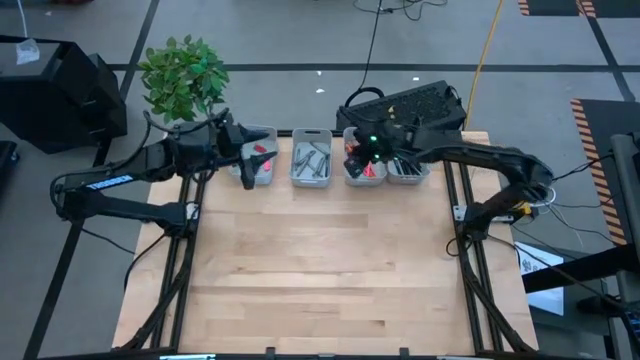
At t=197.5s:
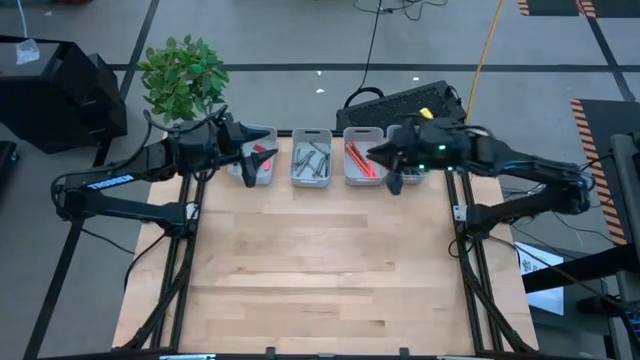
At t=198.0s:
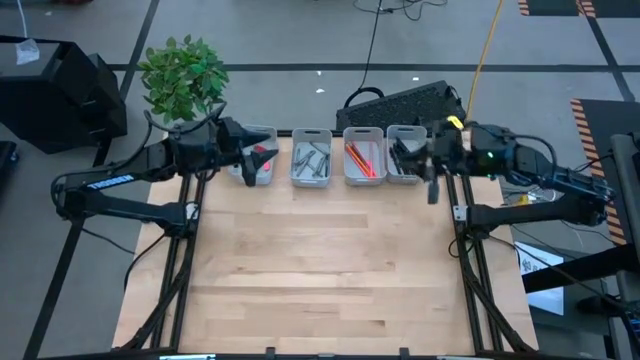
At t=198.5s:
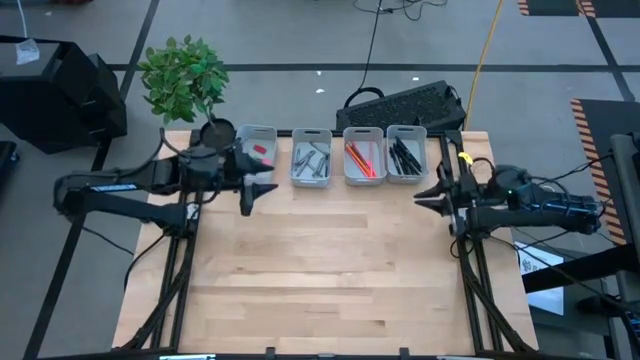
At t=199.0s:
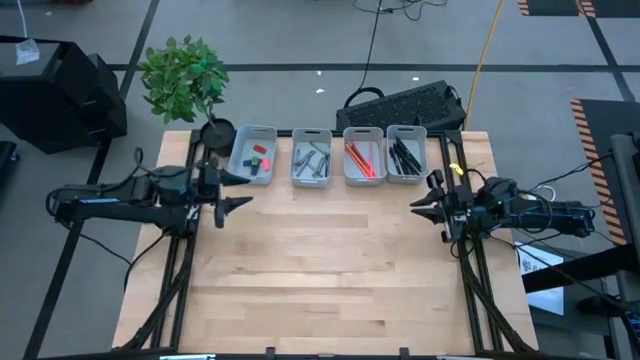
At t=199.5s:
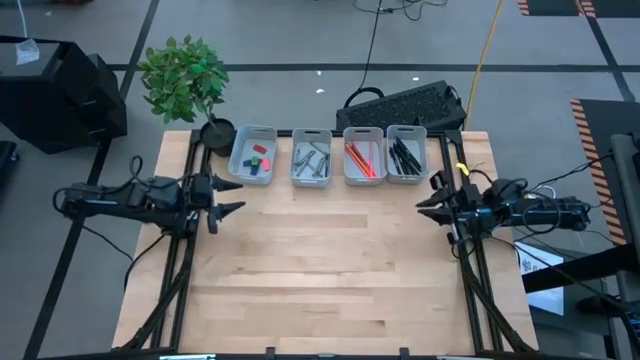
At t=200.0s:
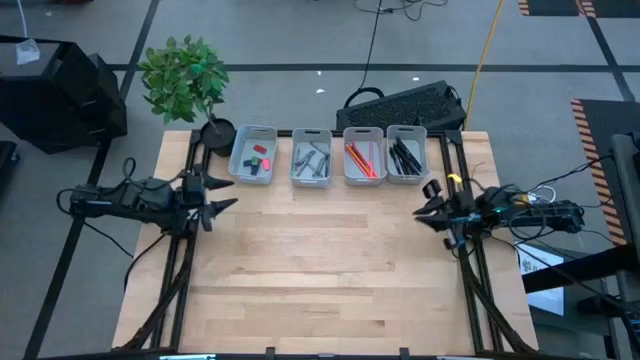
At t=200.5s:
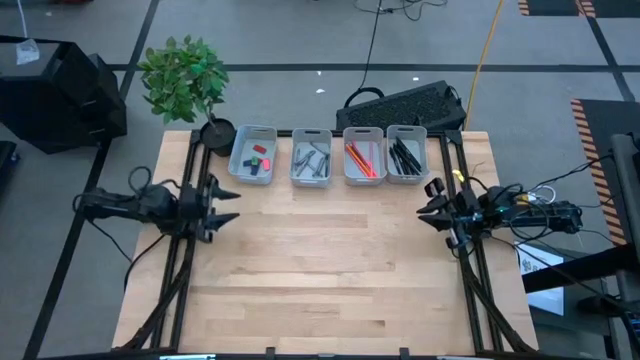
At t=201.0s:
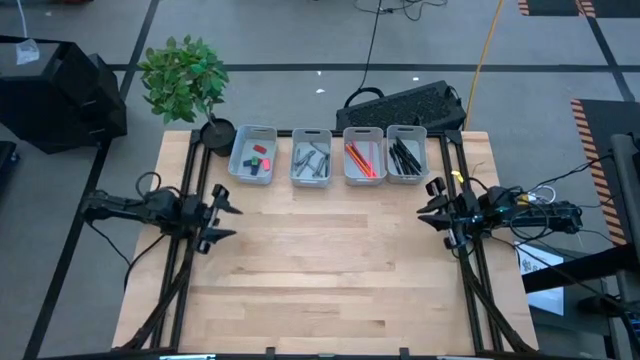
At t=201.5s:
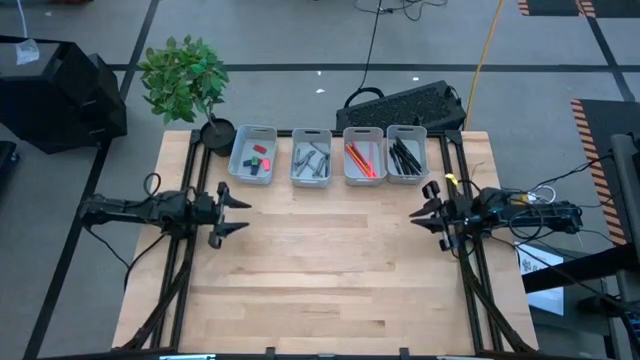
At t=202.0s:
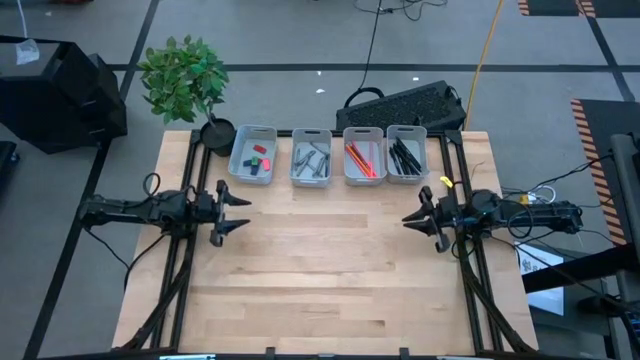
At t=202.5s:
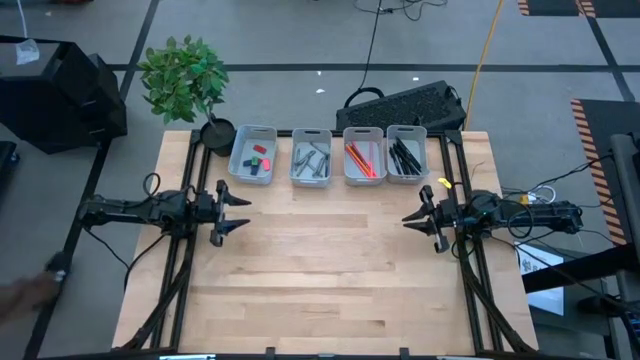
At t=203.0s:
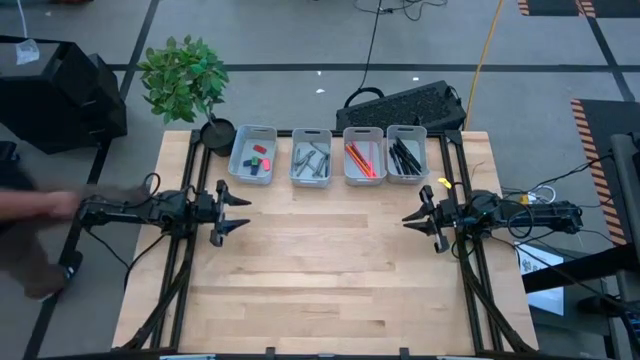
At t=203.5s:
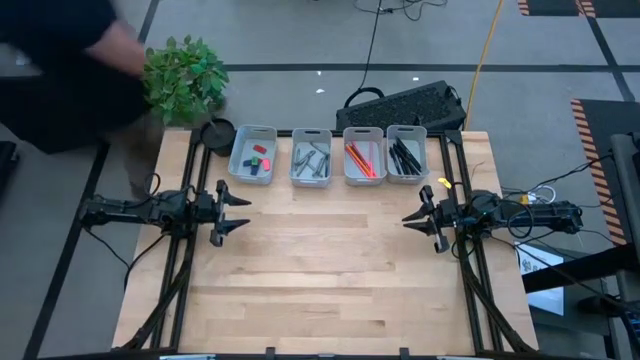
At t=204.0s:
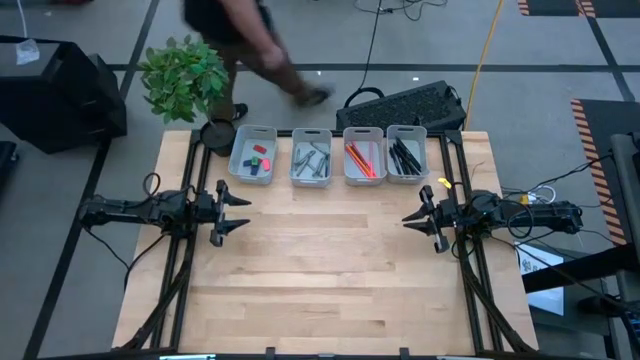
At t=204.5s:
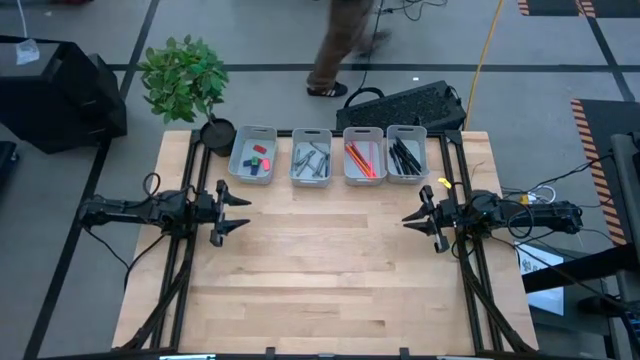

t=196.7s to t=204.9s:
Task: Sort crayons/erasers/pens/pencils in bins
Return to Home Position

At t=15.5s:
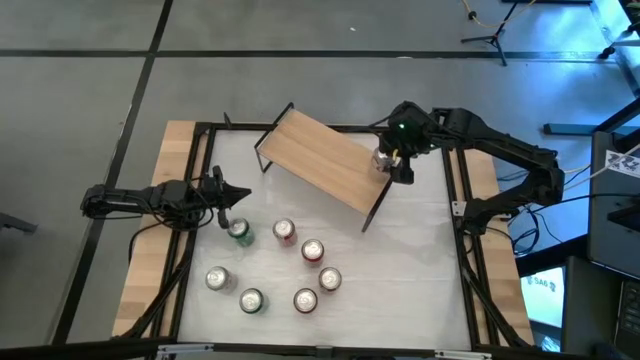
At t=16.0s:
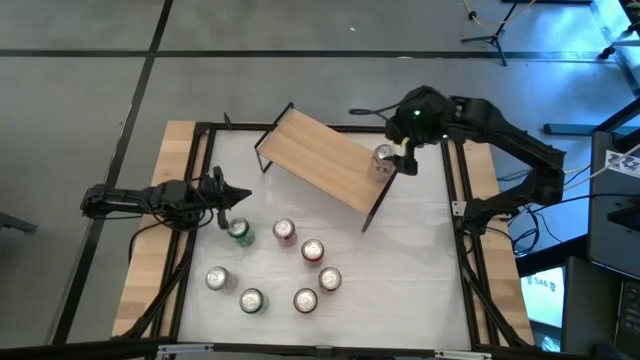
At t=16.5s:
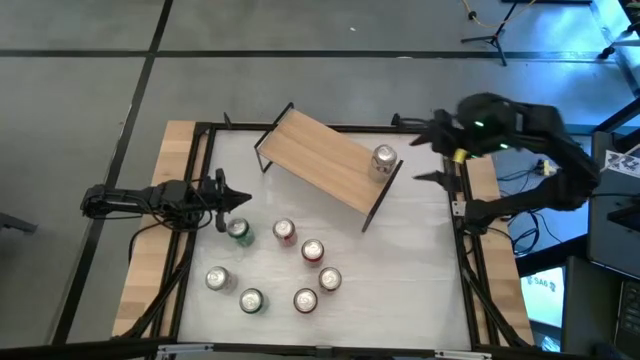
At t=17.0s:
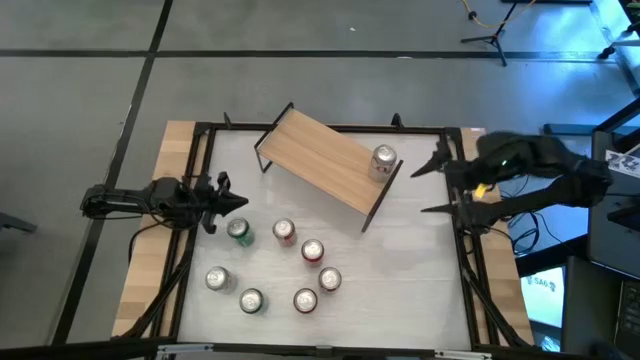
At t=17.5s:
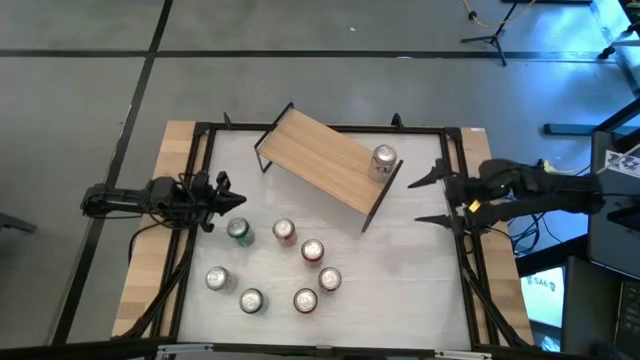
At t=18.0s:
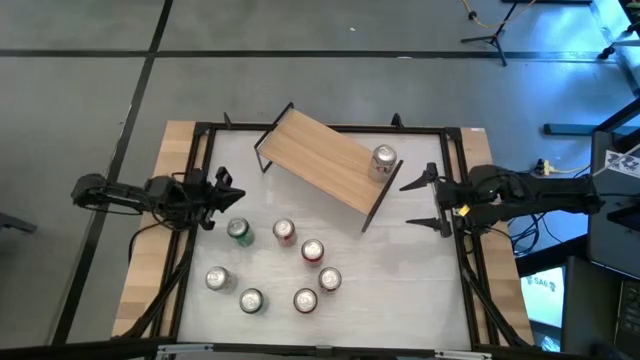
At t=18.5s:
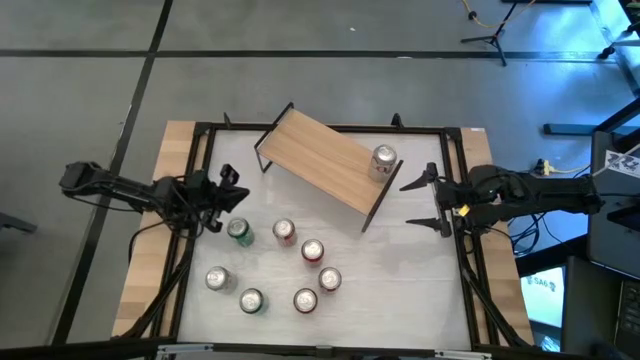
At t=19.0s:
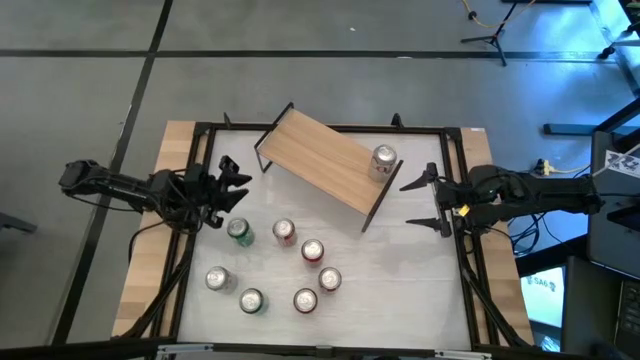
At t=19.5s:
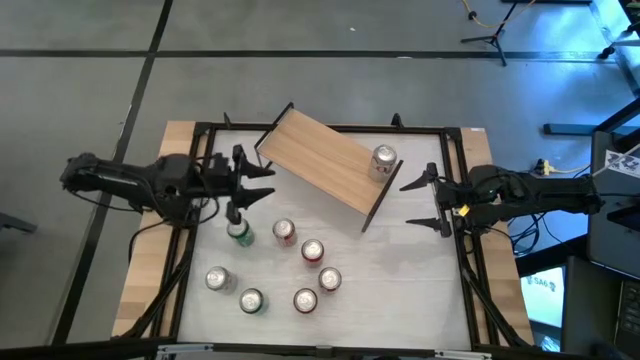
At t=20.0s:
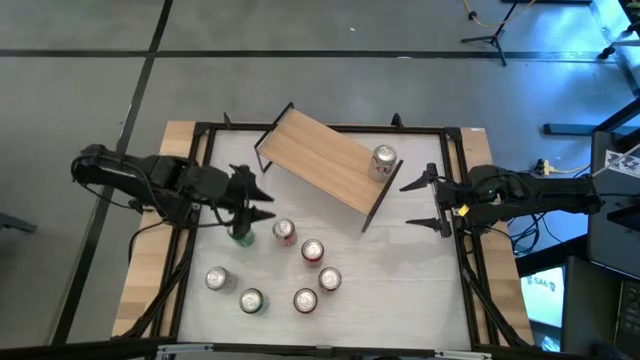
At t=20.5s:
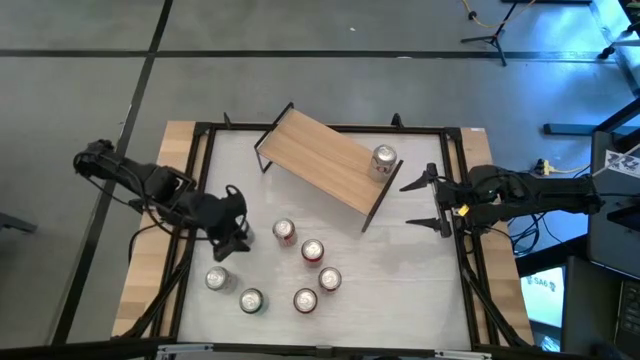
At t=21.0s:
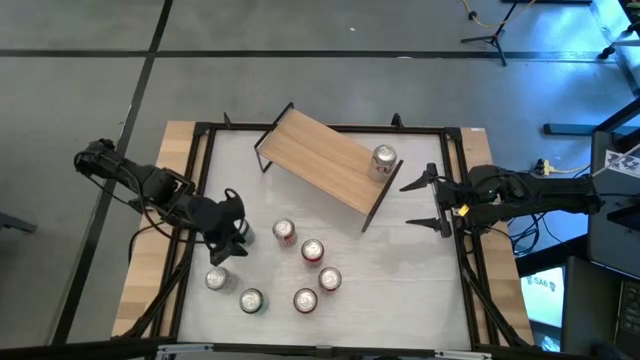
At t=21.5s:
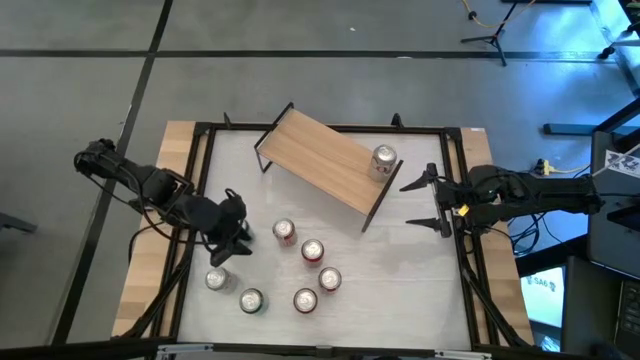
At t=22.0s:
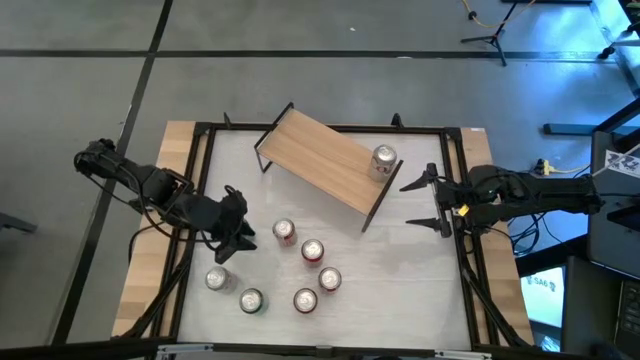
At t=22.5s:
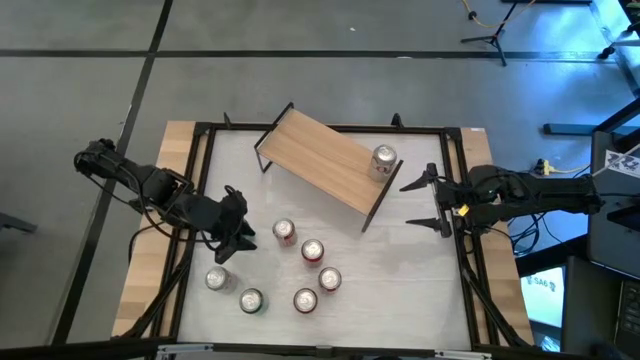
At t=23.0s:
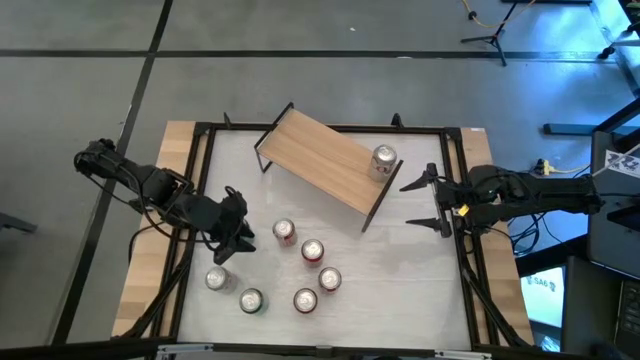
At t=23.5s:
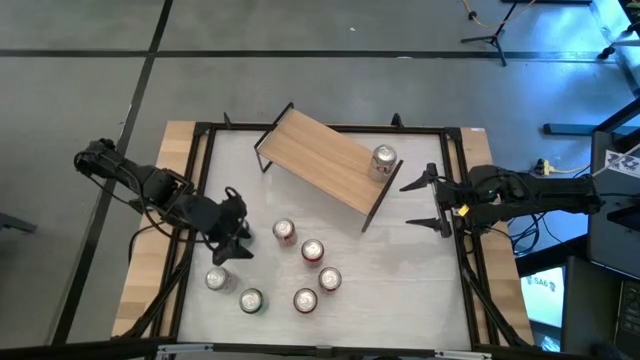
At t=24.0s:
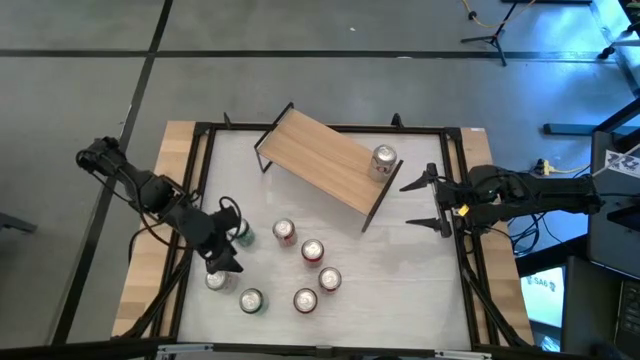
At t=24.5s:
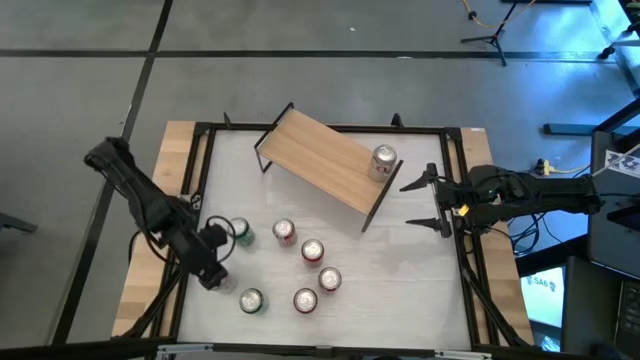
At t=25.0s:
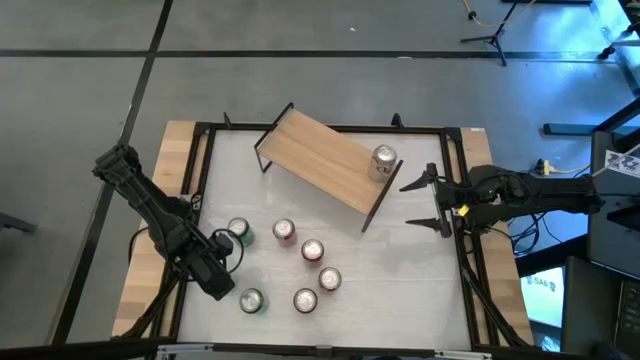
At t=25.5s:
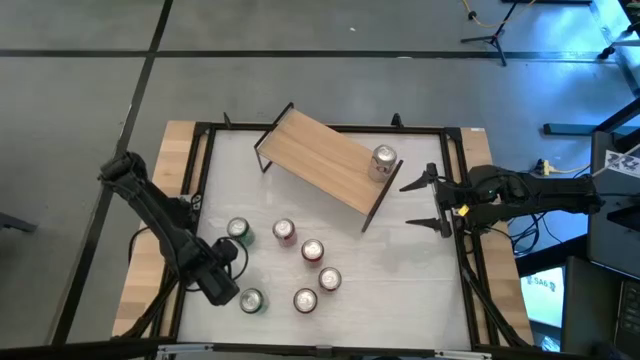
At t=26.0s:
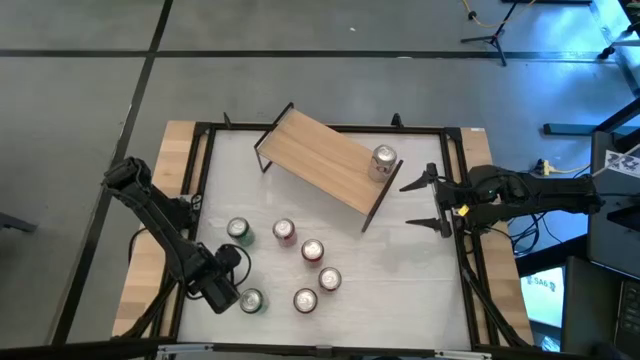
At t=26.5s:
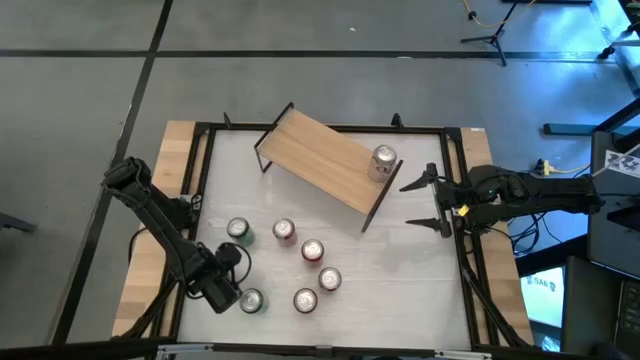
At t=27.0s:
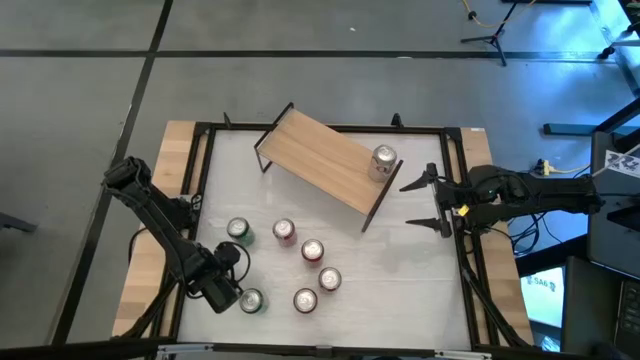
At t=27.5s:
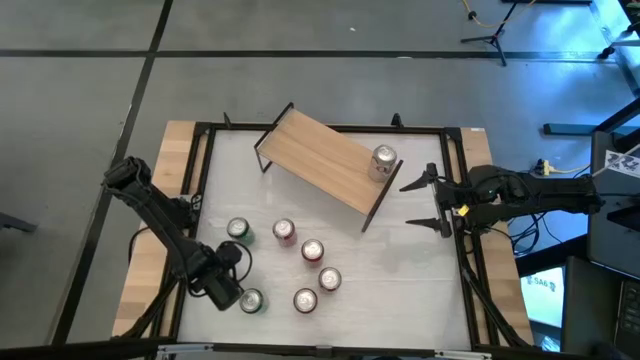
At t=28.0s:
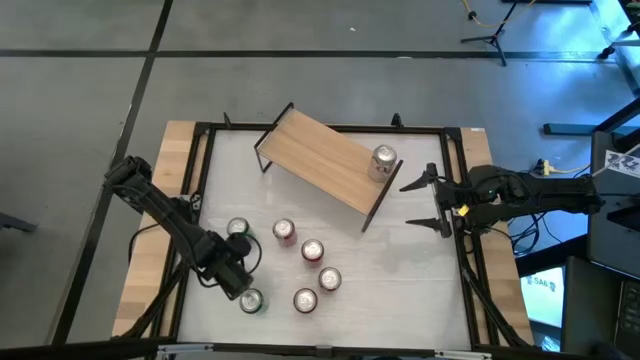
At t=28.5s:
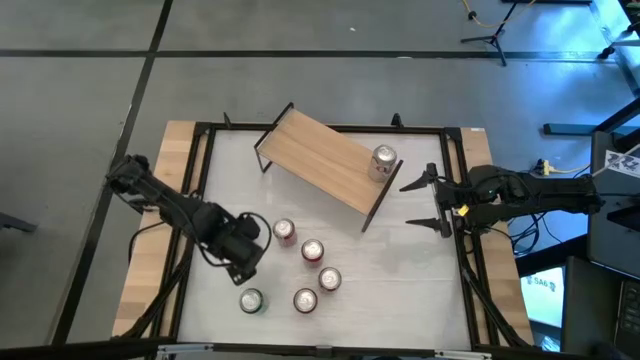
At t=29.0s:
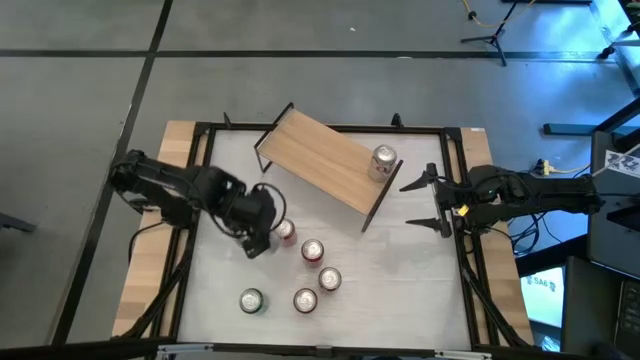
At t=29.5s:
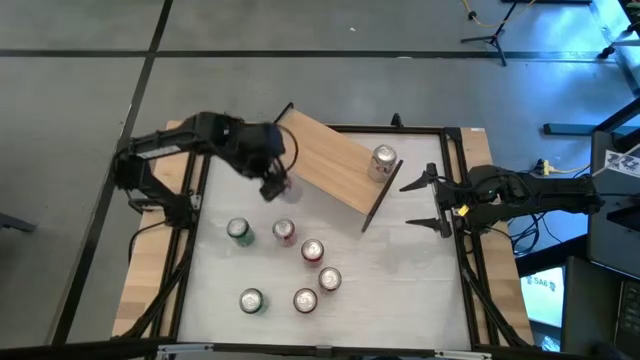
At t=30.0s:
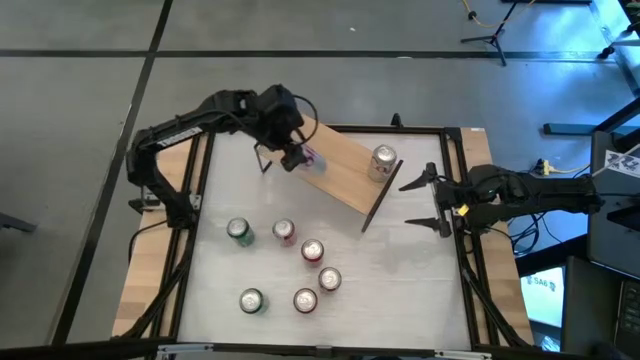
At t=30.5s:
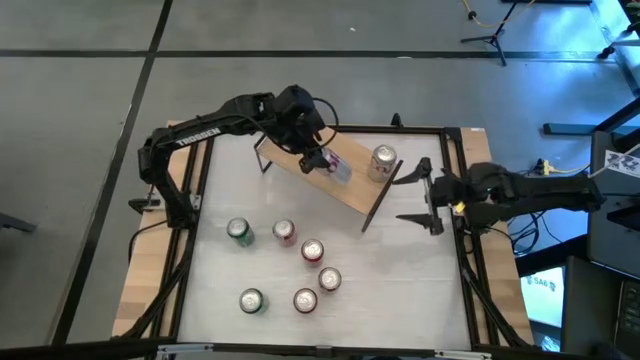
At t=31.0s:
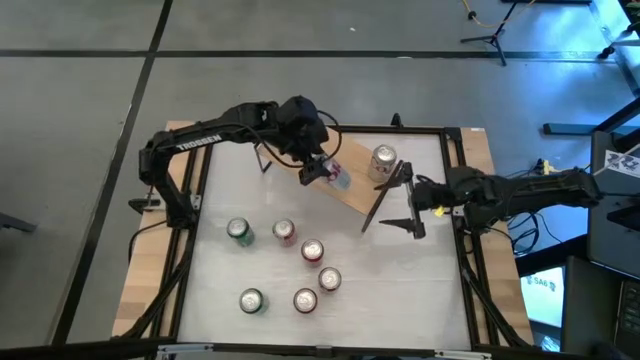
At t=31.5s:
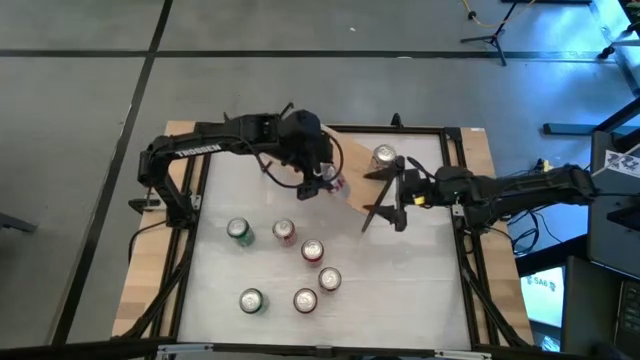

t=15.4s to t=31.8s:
Task: Place canned beverage on shelf
Put the red-silver soda can on the shelf aligned with the other red-silver soda can
